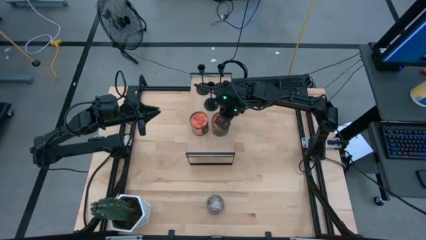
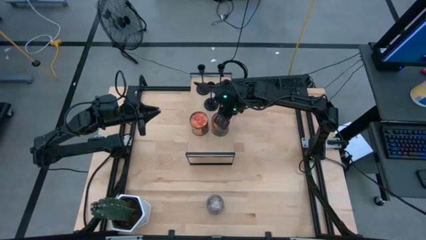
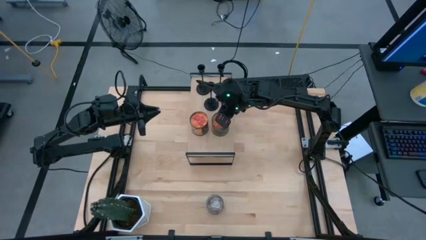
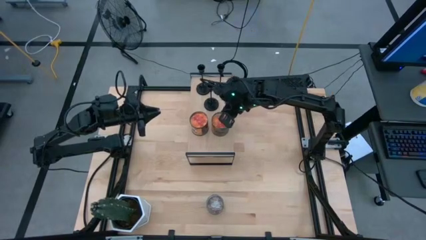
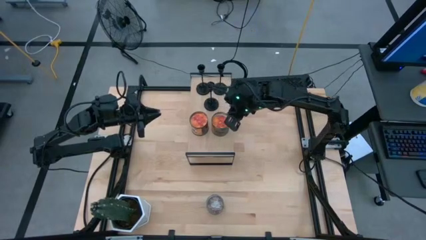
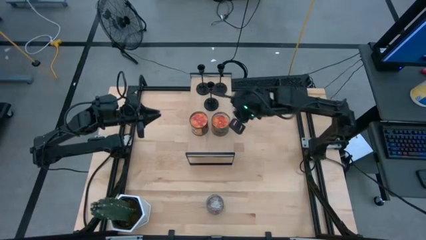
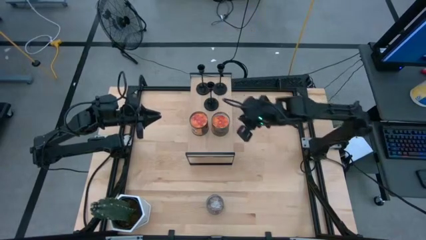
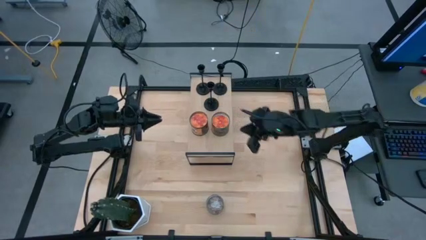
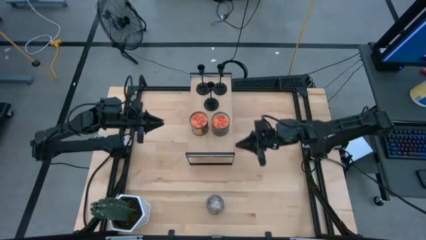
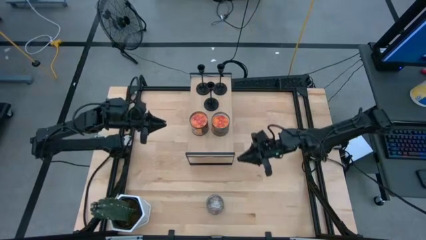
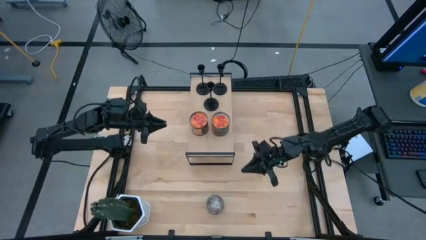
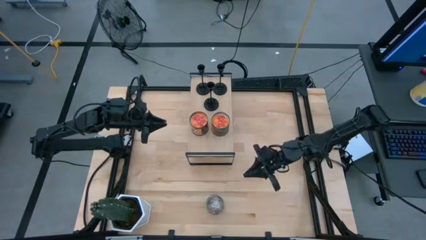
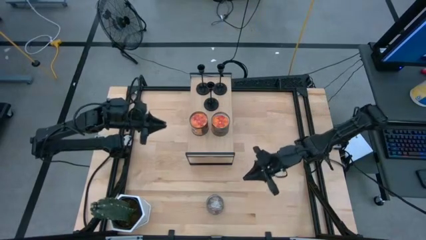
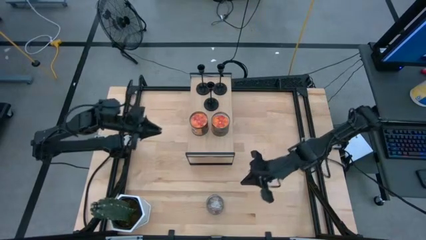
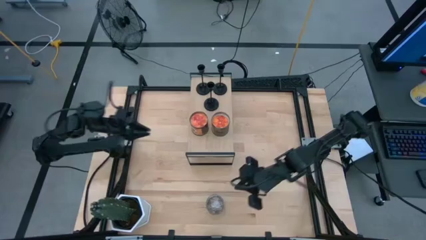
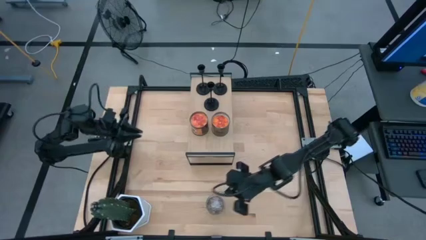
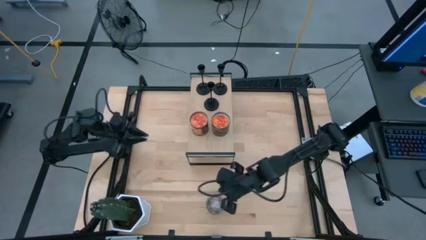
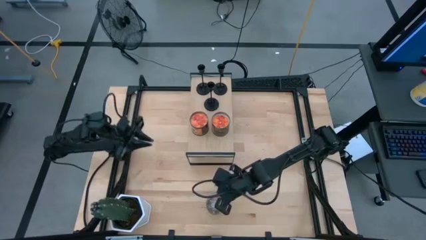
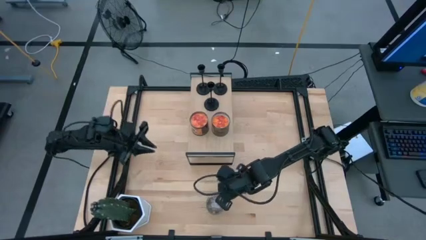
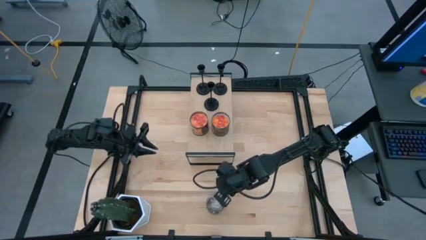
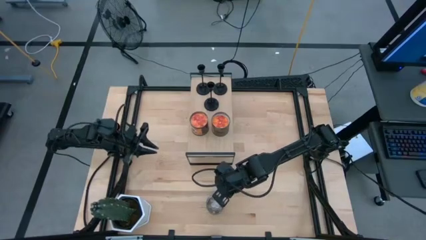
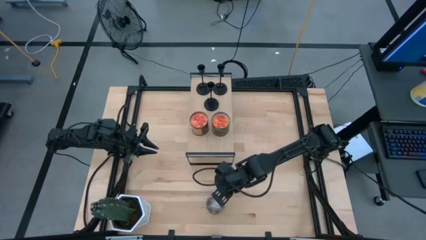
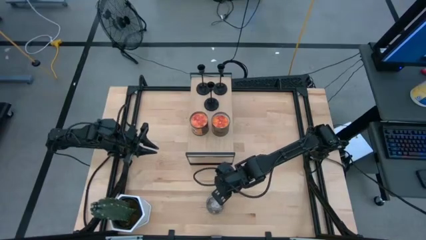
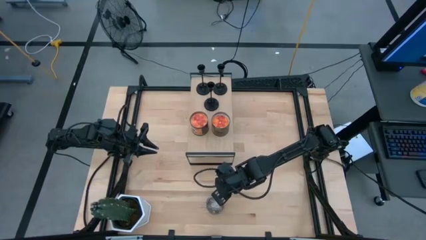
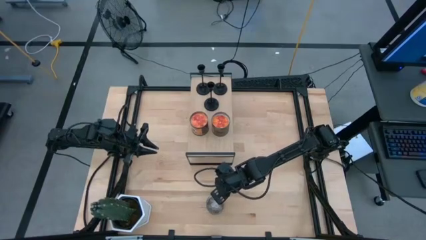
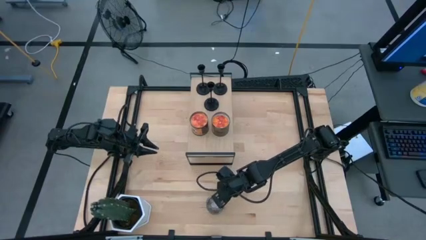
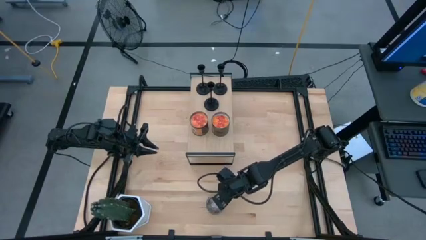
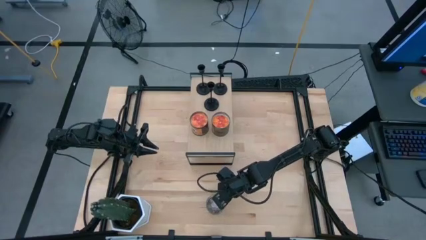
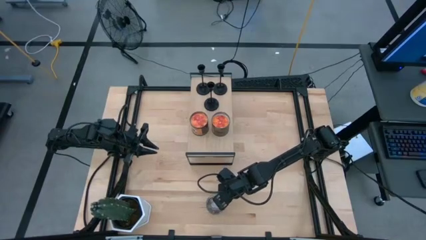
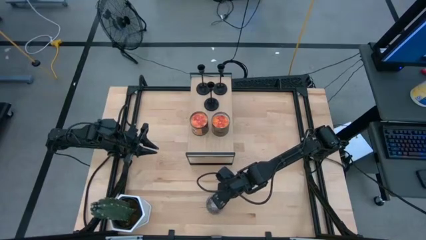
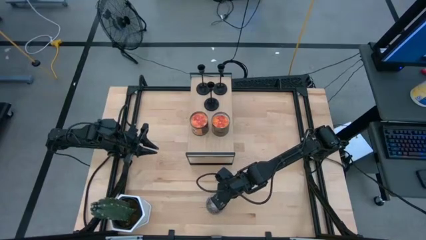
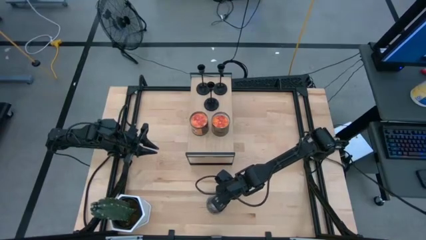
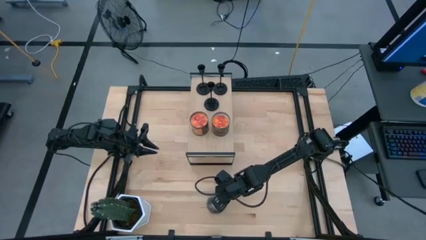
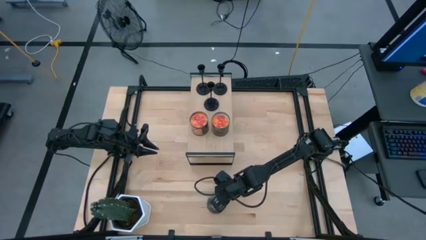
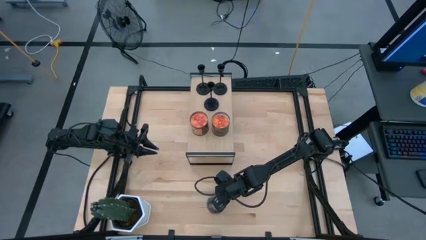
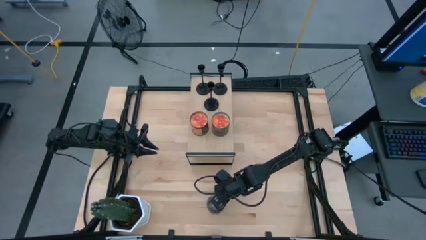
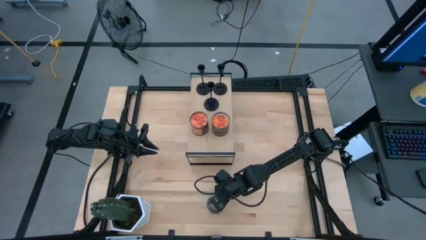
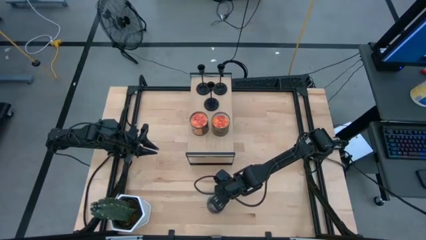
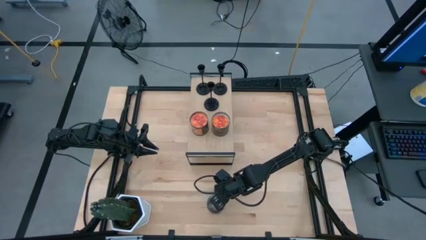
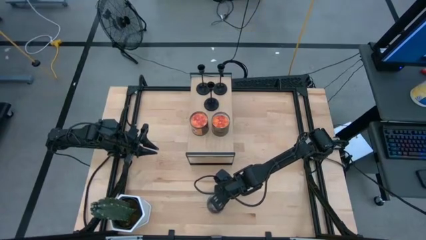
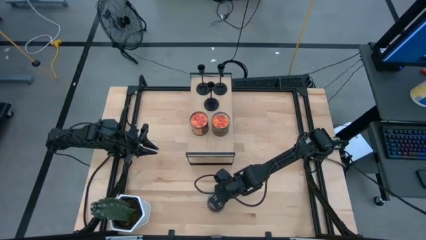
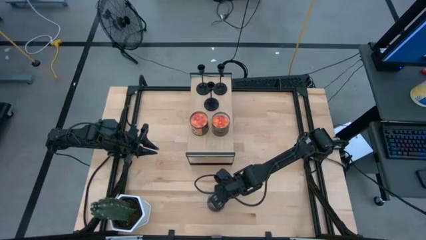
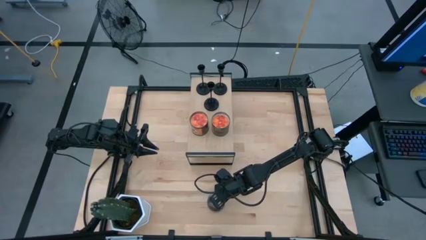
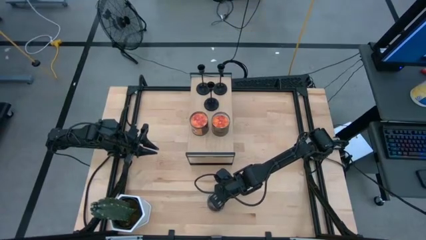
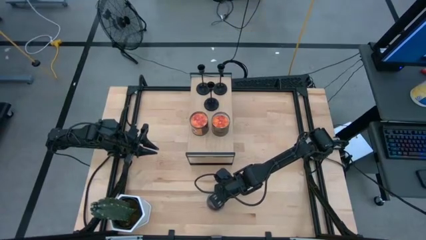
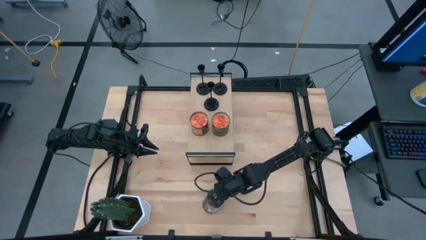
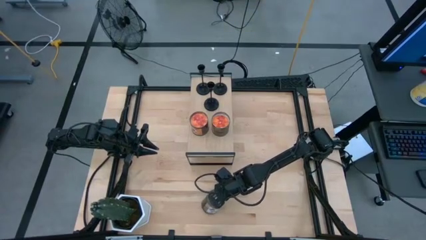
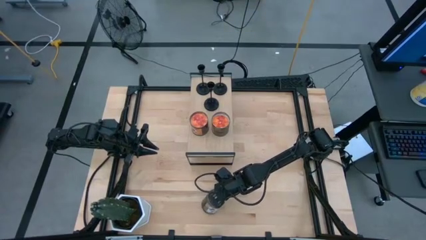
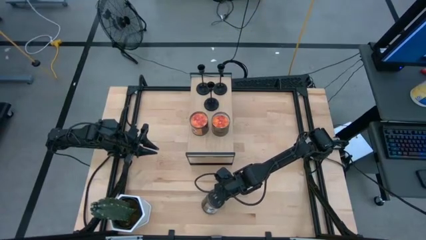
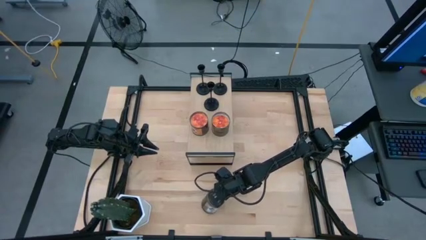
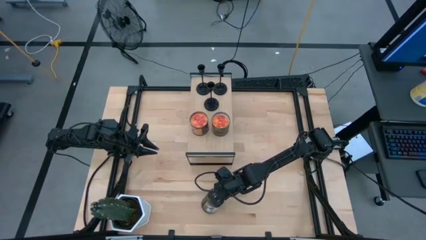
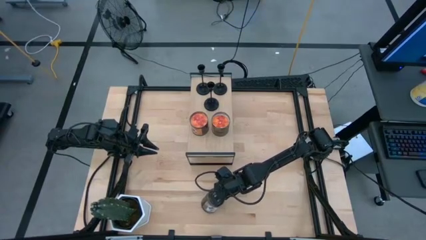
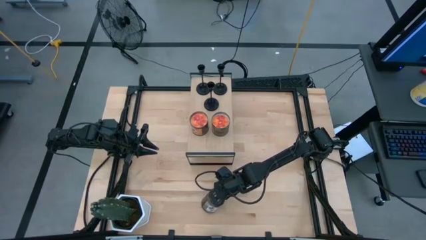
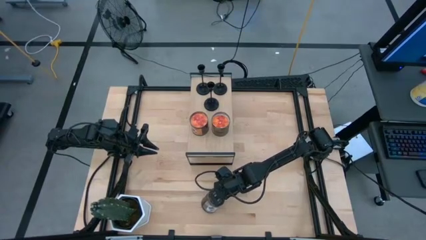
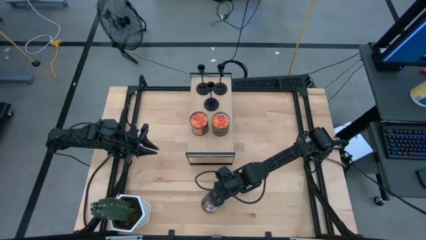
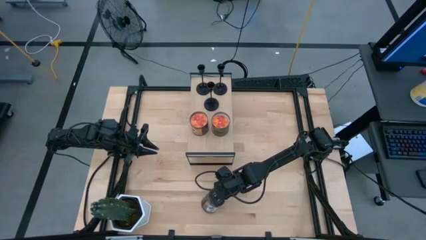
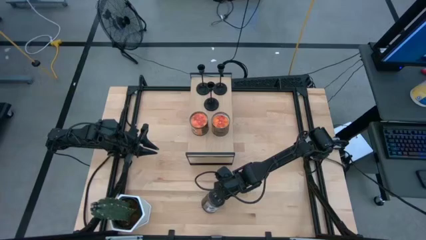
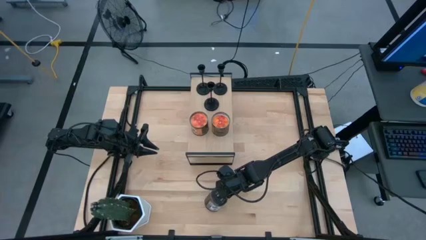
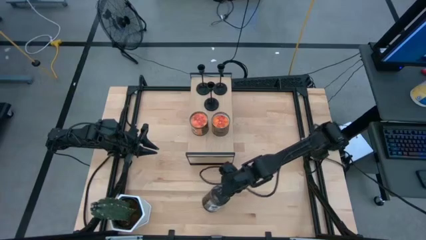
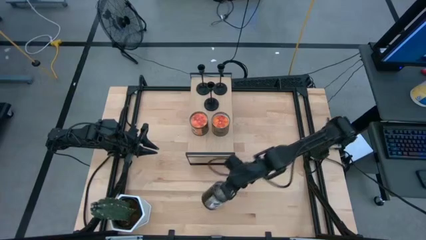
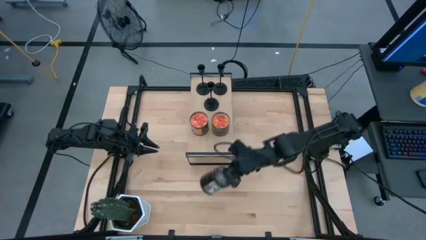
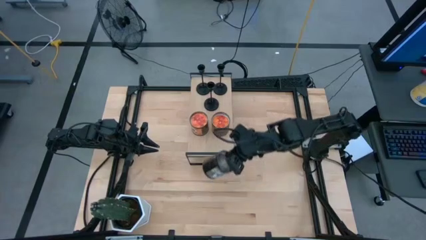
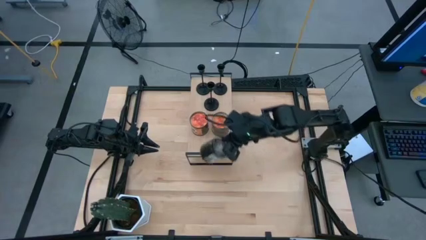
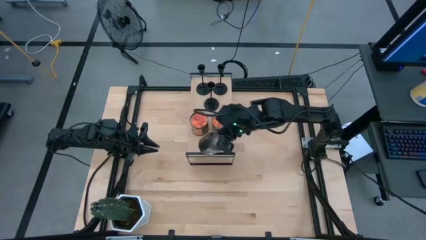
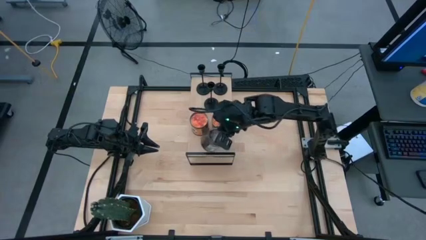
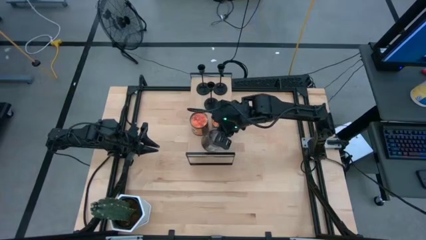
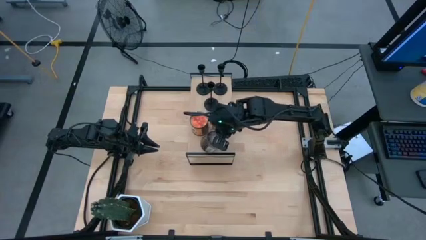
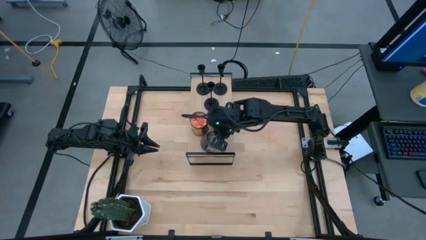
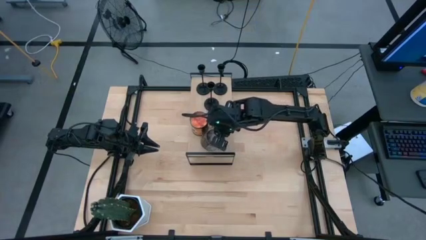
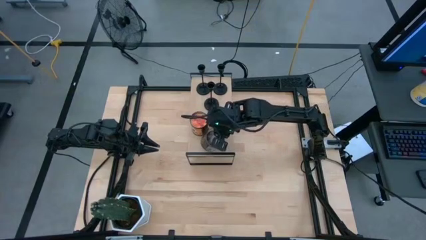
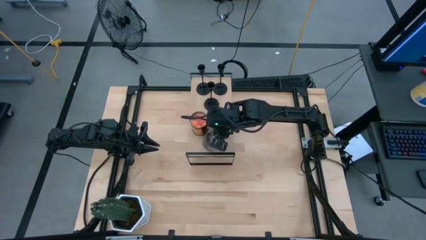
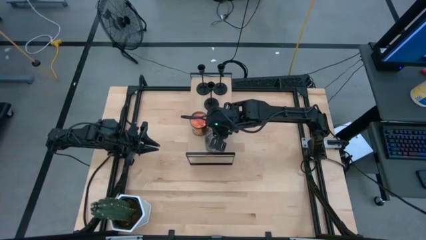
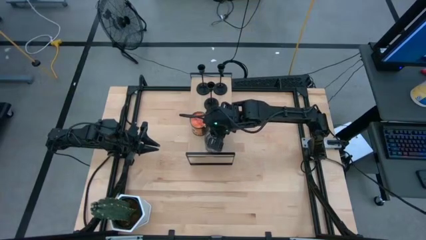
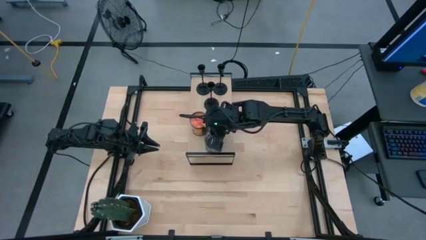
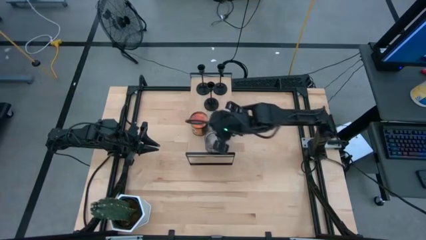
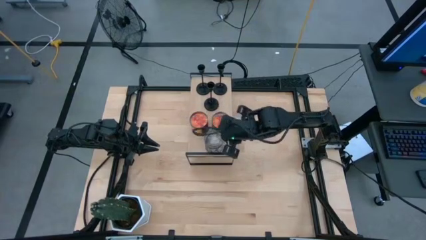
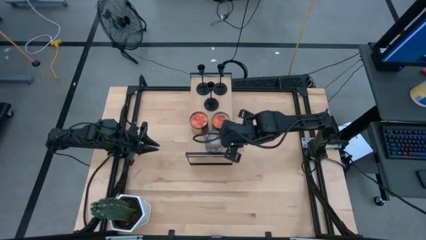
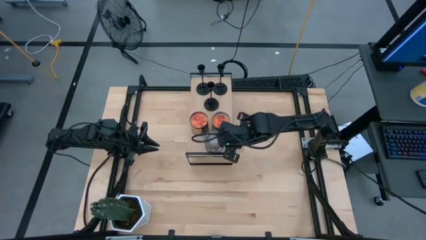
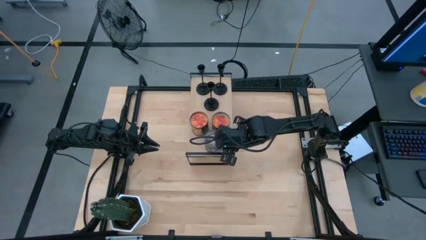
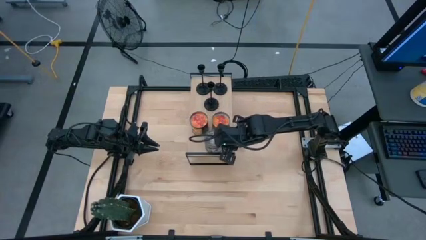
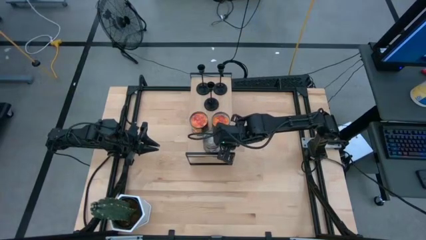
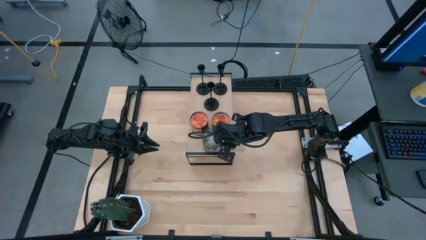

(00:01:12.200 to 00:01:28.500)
Task: Pick & Place candle stick holders
Put the brown scented candle on the shelf
